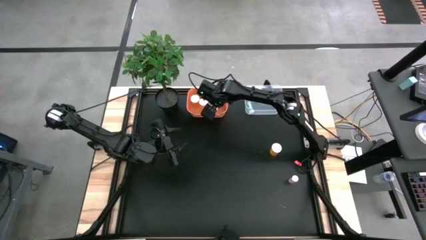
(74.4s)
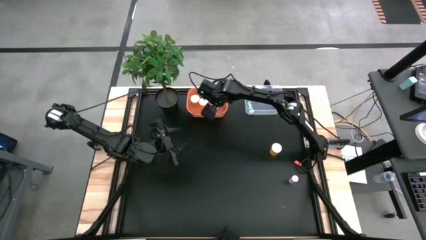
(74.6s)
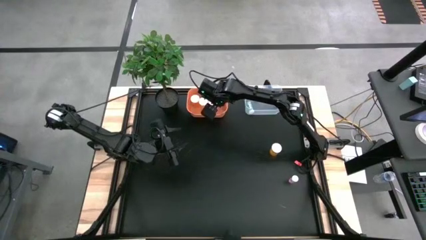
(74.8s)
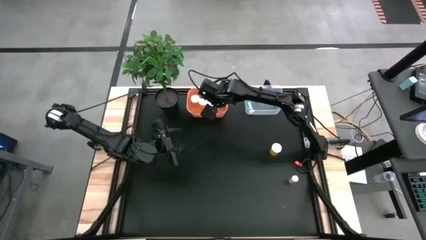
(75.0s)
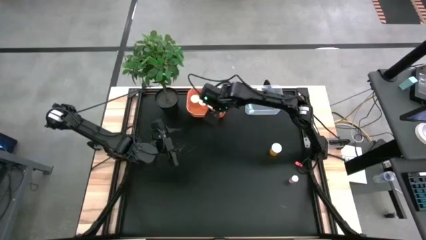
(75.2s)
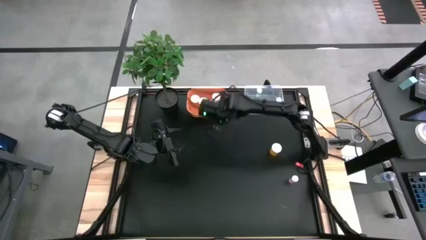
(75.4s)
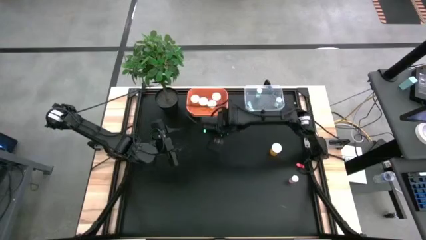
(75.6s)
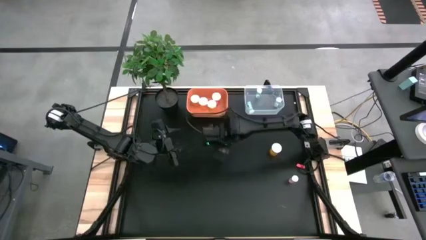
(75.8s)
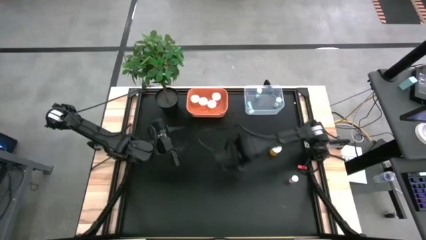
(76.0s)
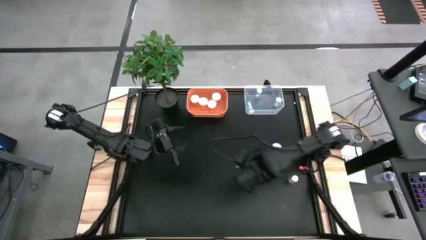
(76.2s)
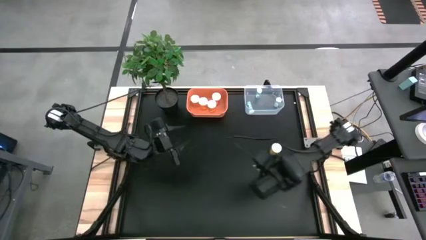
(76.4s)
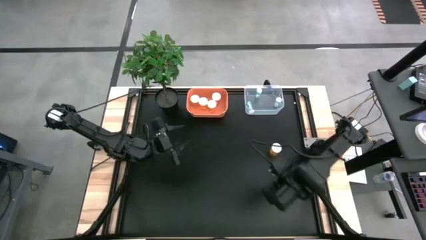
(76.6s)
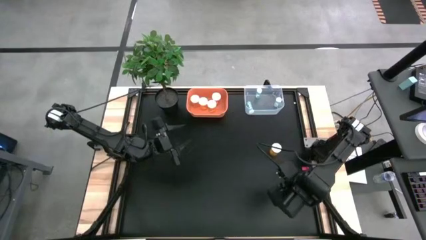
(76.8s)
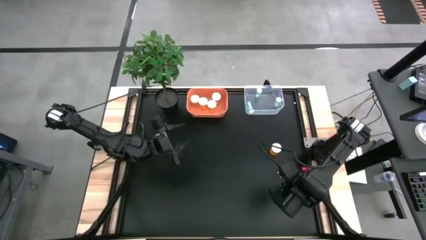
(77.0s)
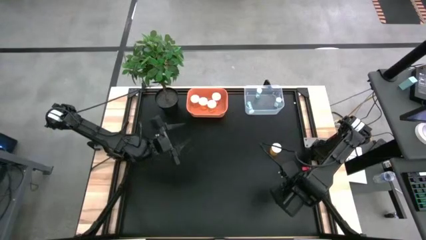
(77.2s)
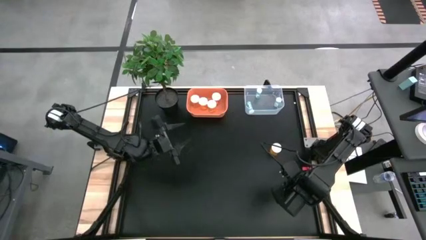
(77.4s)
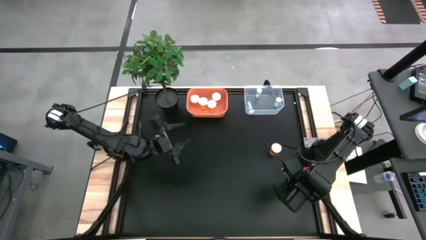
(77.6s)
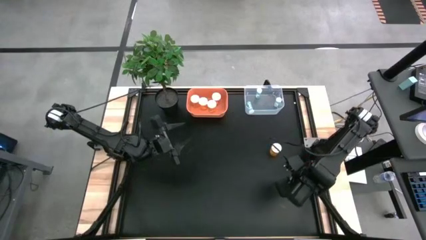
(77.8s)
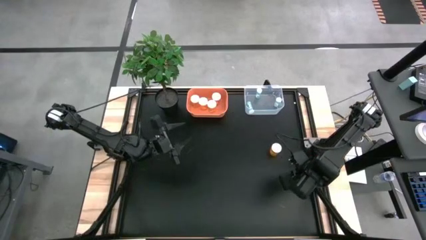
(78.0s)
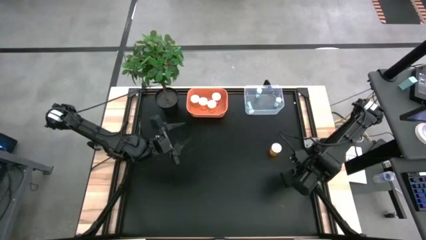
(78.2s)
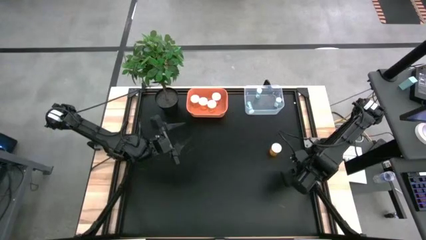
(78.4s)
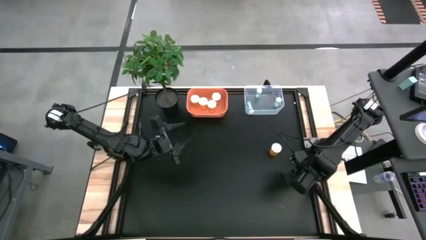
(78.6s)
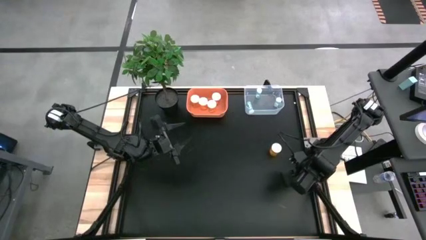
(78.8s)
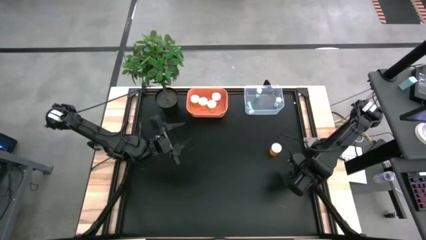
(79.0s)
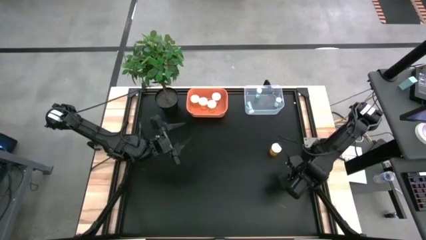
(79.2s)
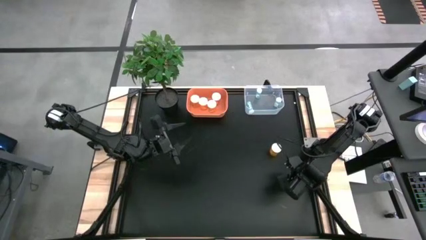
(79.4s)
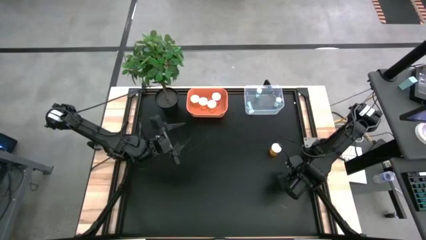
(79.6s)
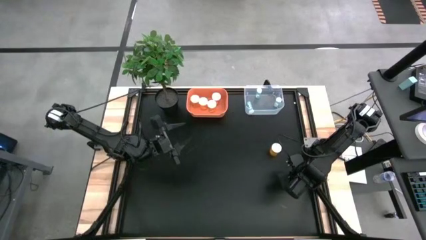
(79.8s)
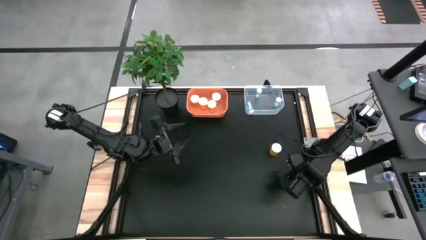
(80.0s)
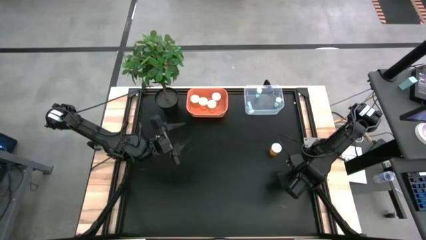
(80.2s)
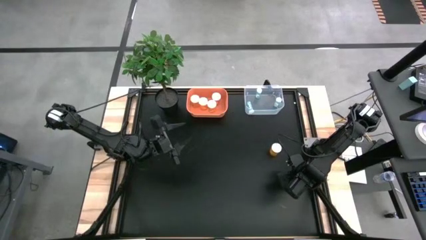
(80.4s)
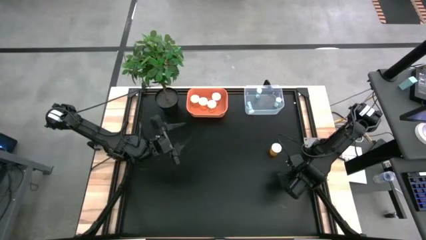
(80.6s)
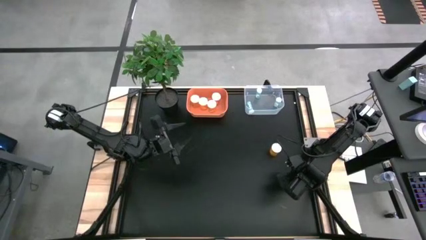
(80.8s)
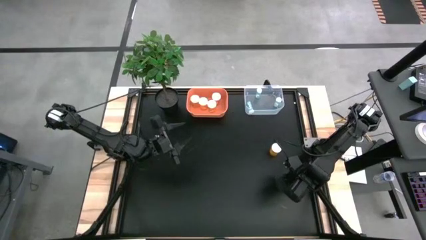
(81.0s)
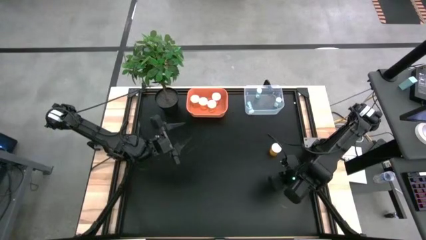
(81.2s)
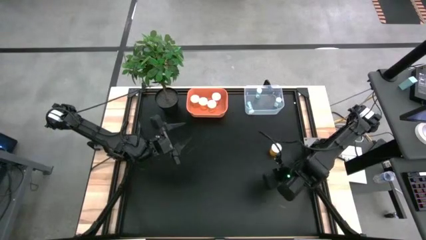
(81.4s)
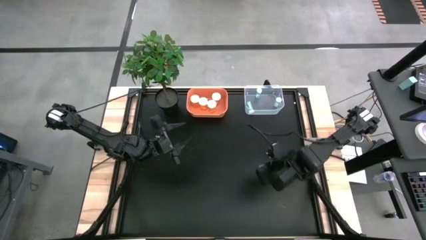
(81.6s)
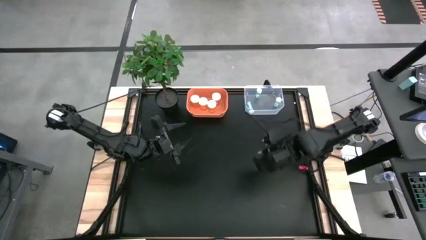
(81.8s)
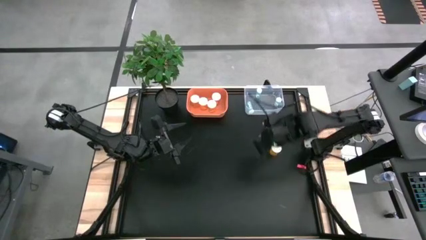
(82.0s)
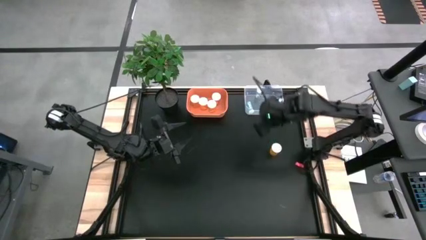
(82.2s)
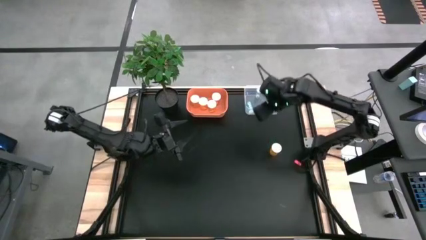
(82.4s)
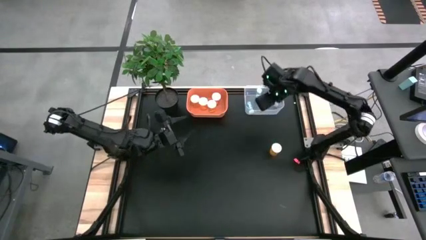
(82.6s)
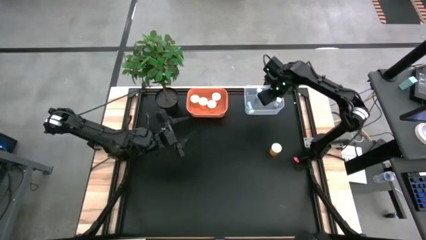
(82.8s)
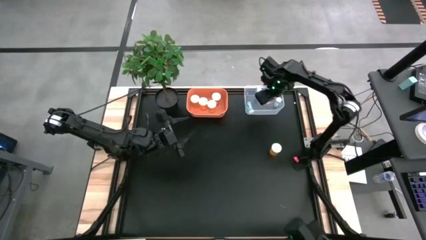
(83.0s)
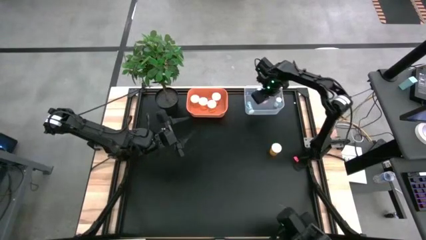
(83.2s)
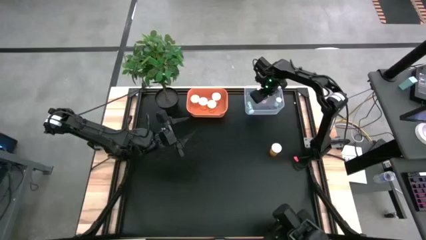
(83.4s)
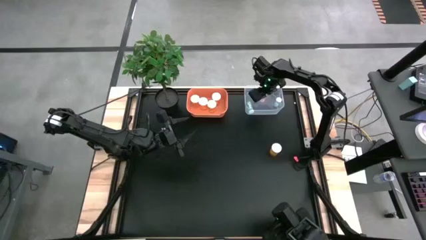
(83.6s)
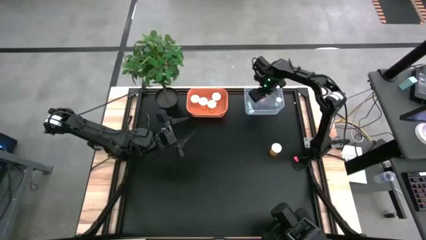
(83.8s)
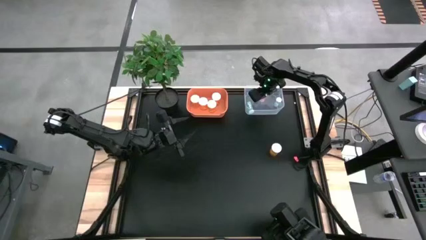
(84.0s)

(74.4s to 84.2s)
Task: Pick and place medicine bottles into bin by pill shape (circle, oval)
Put the pink pill bottle into the transparent bin

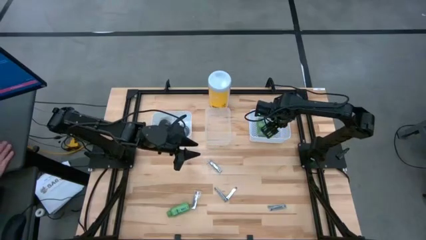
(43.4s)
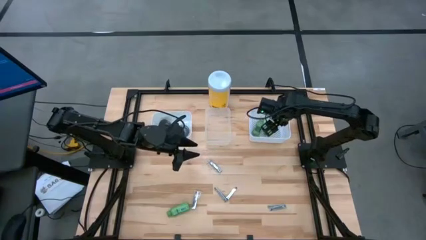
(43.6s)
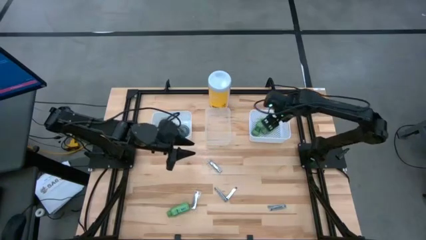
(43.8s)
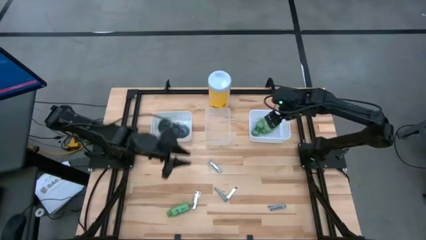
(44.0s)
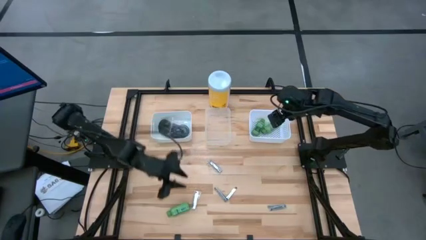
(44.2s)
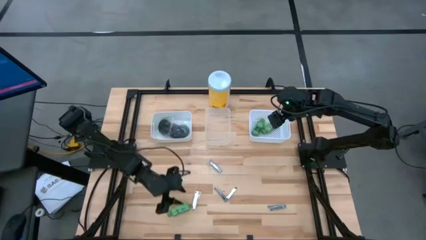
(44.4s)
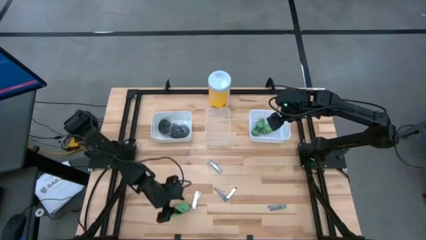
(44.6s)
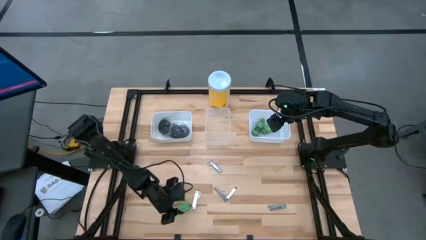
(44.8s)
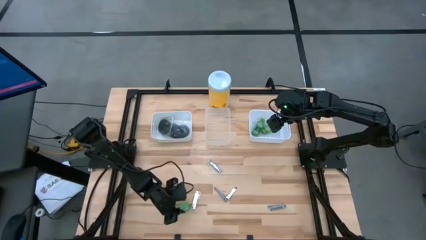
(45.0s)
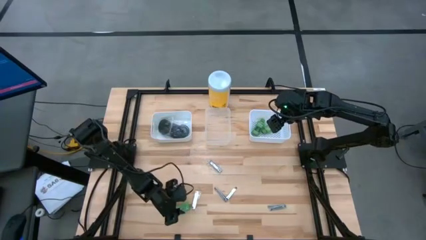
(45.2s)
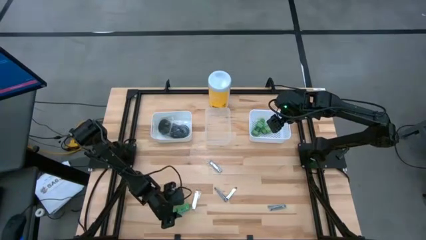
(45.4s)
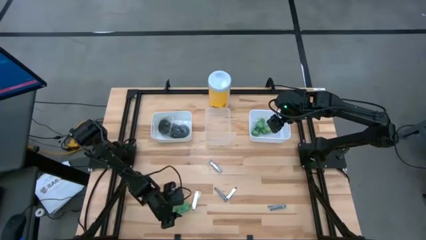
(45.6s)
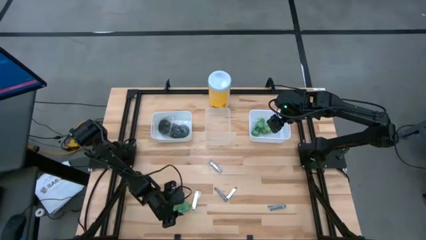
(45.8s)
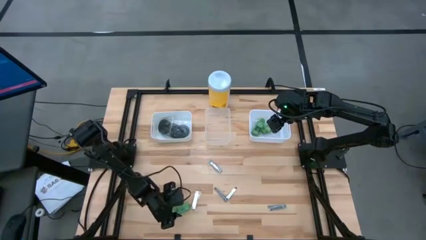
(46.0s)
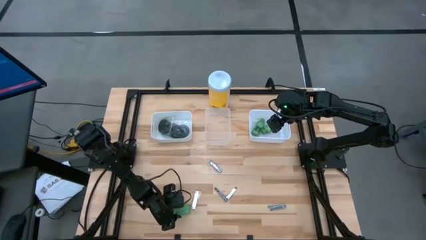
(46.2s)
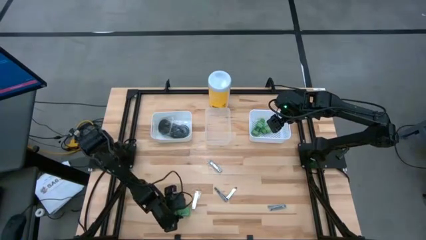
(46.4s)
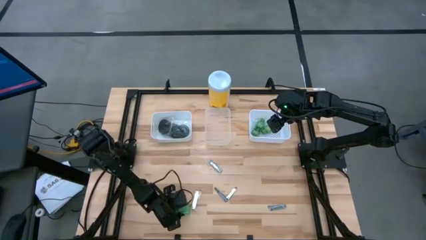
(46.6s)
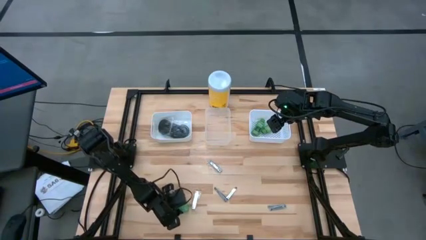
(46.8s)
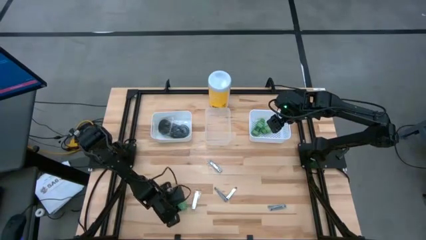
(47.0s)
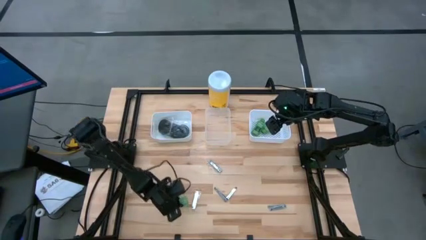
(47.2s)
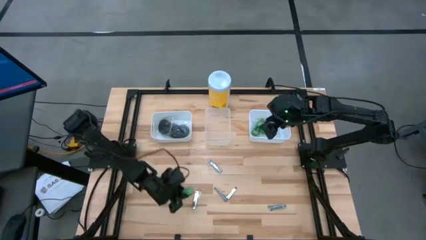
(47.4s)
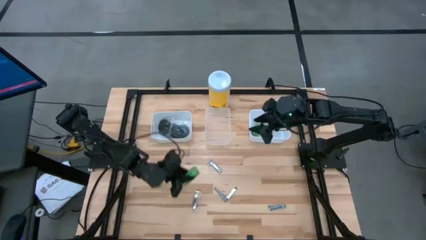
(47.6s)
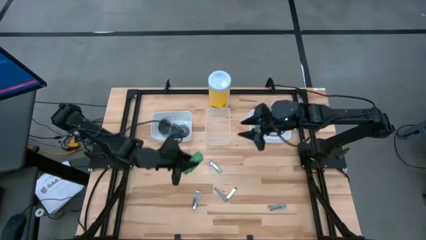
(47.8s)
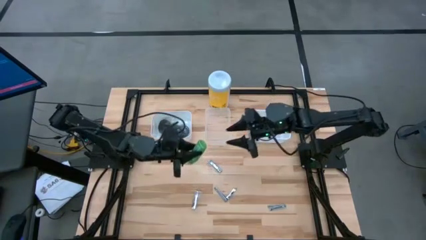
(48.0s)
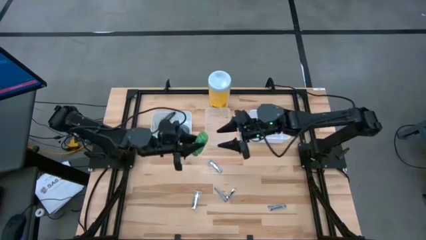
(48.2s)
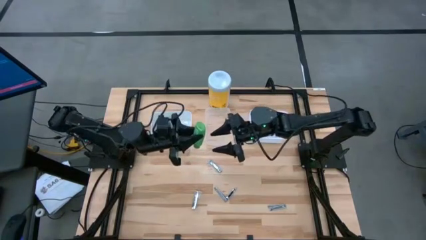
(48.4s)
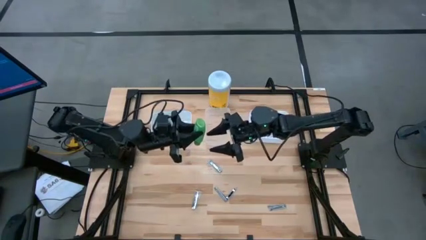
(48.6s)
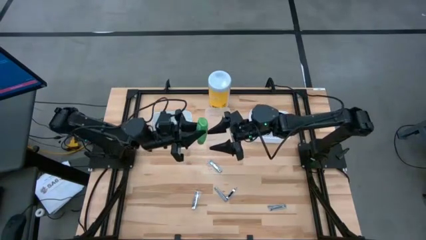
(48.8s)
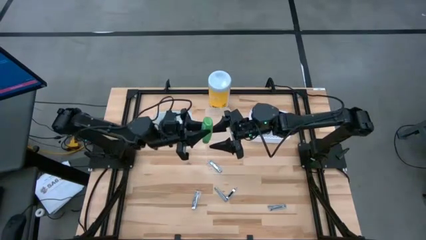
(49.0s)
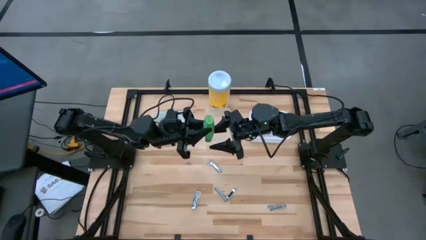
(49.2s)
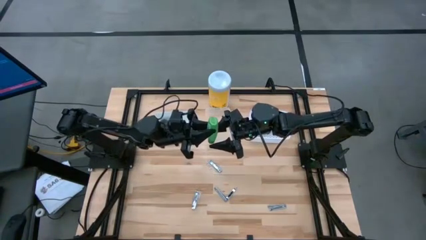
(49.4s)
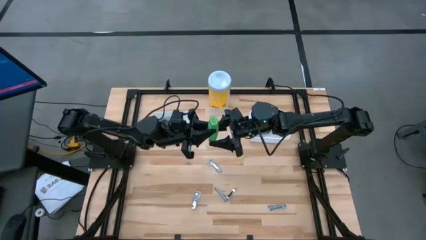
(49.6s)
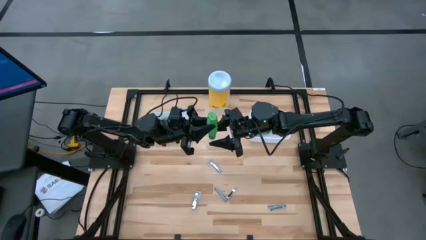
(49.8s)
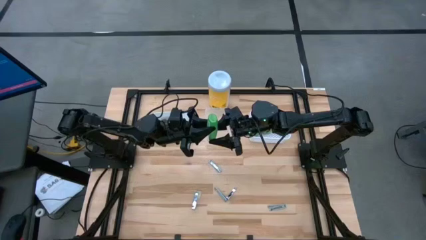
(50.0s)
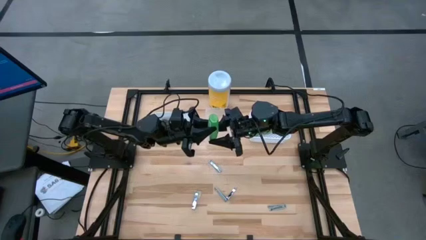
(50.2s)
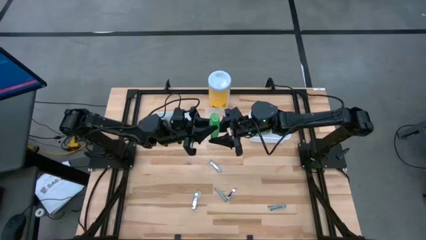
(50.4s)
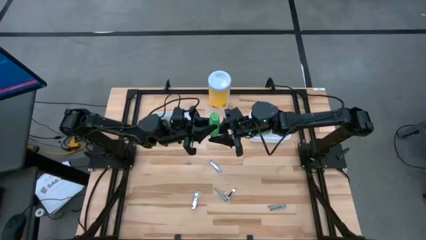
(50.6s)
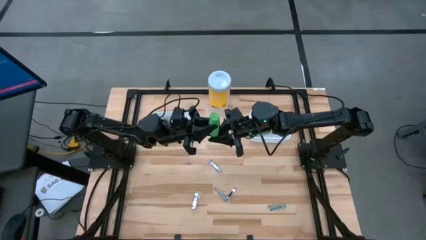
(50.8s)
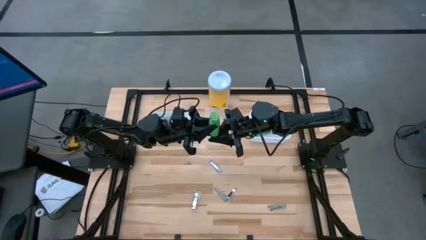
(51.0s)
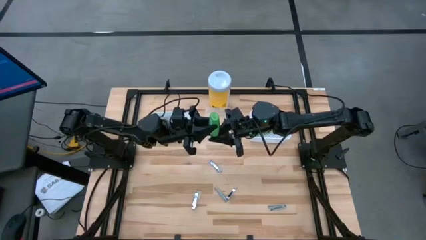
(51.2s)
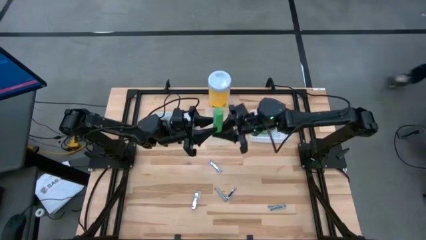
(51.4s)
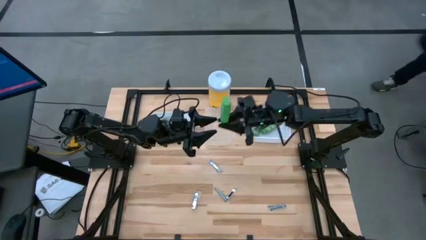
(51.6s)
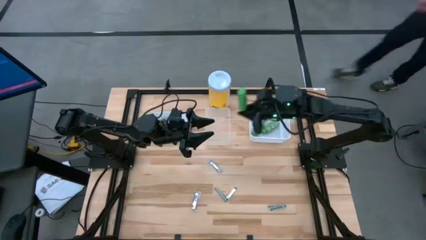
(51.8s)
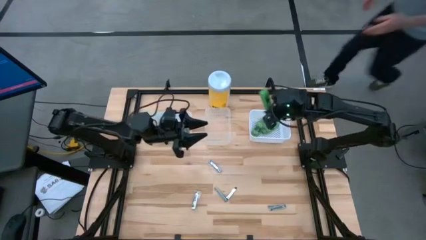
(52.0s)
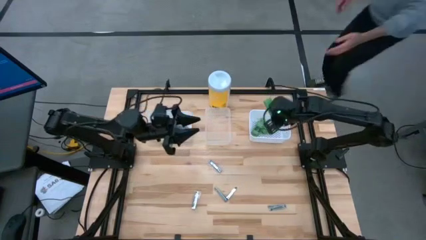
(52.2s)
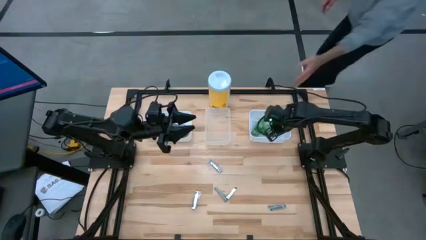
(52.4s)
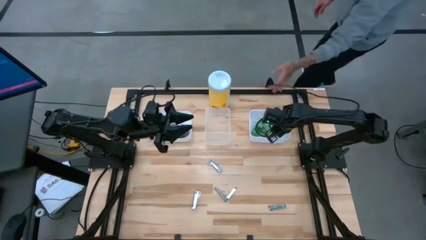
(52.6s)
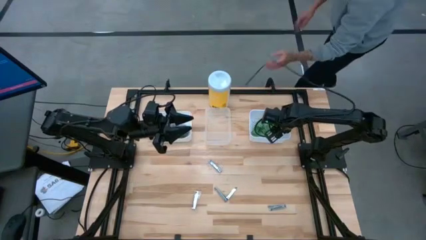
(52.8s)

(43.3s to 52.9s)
Task: Pick & Place Travel size toiletries
Put the green shampoo into the right white bin
